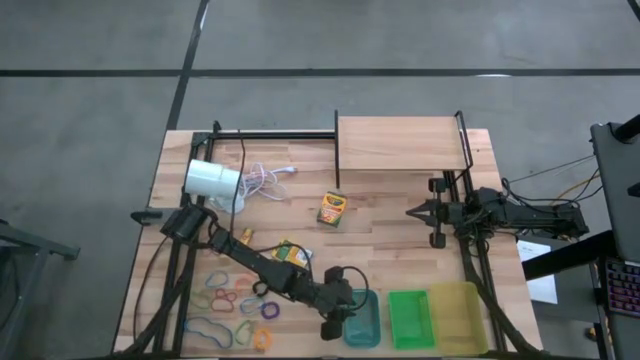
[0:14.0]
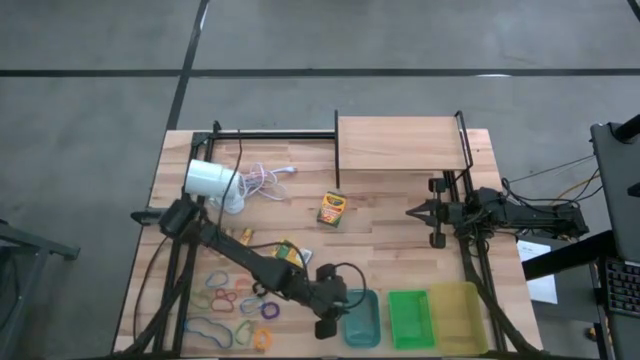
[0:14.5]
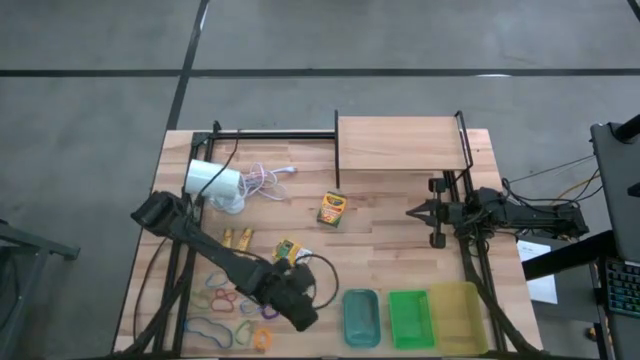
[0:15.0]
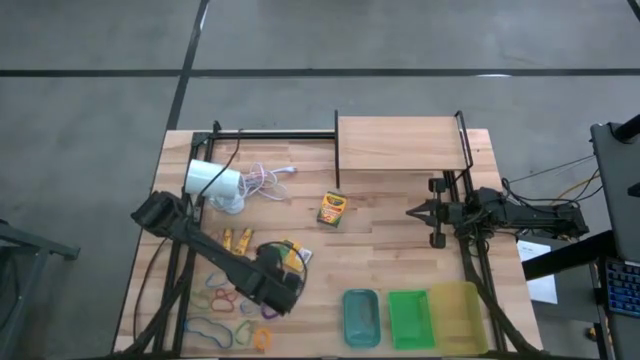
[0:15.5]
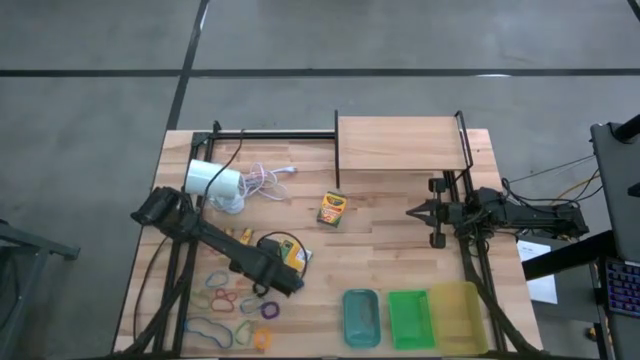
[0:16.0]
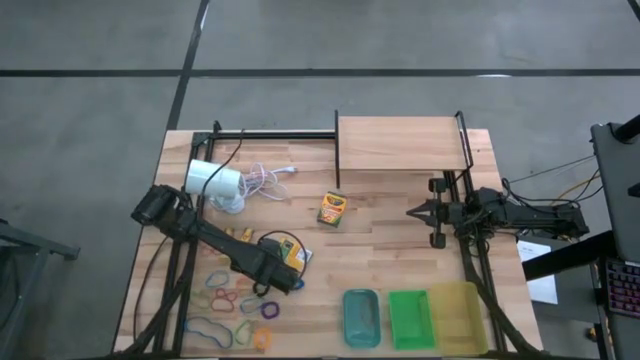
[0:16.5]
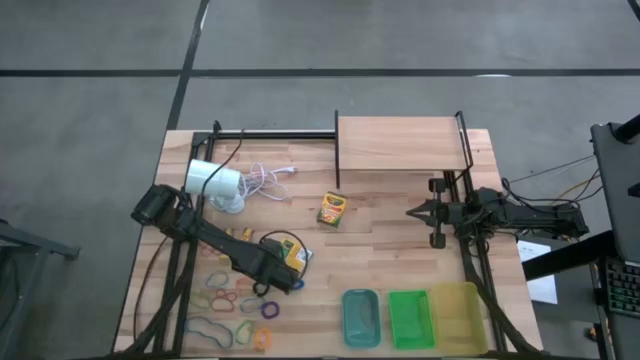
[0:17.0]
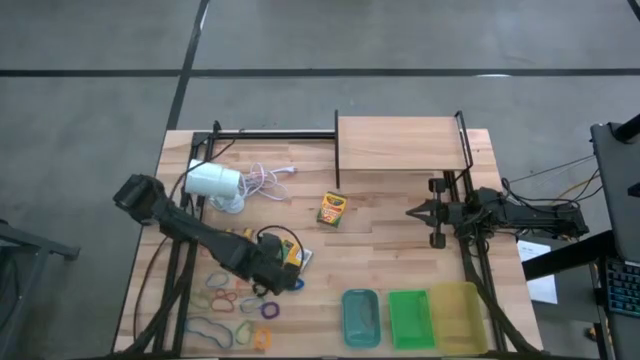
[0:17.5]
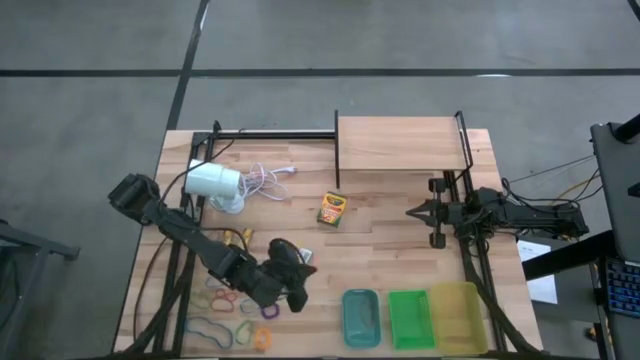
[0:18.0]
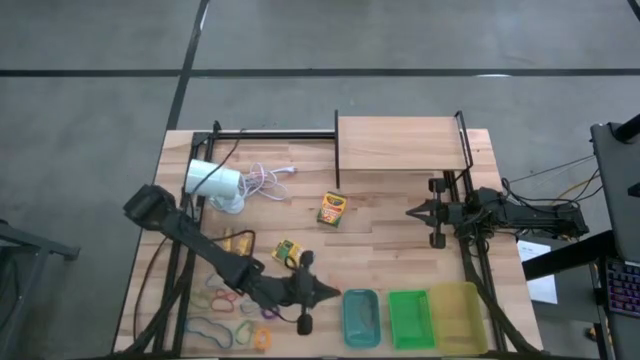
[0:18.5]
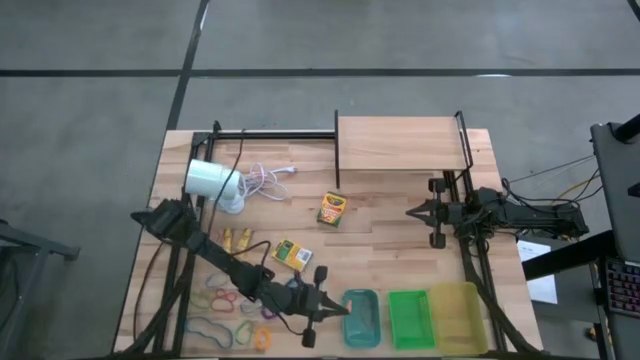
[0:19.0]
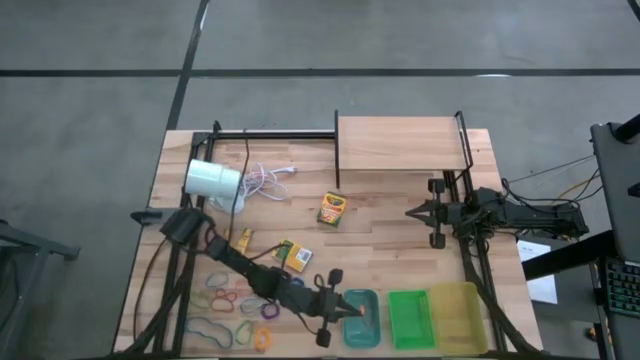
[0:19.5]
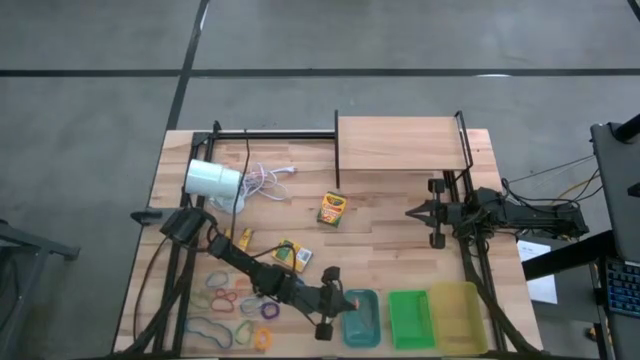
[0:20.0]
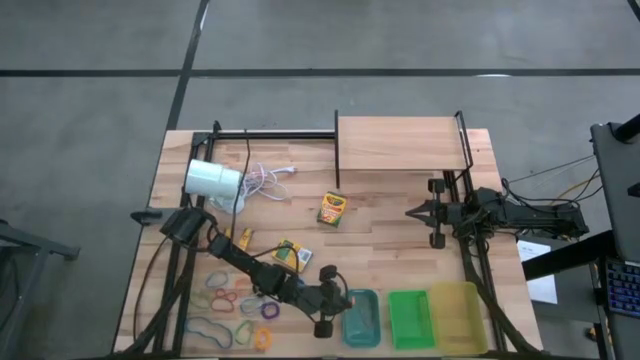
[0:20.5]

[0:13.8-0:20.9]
Task: Pick & Place Office Desk Supplies
Put the orange rubber band into the blue bin

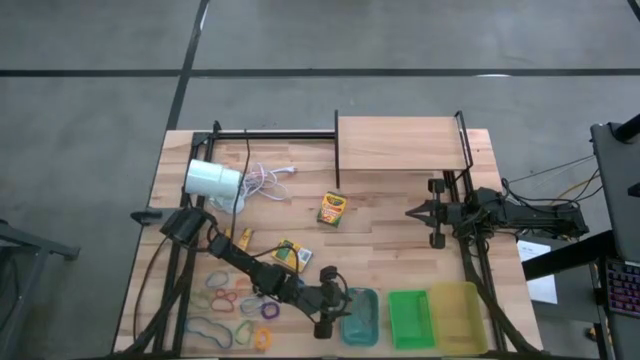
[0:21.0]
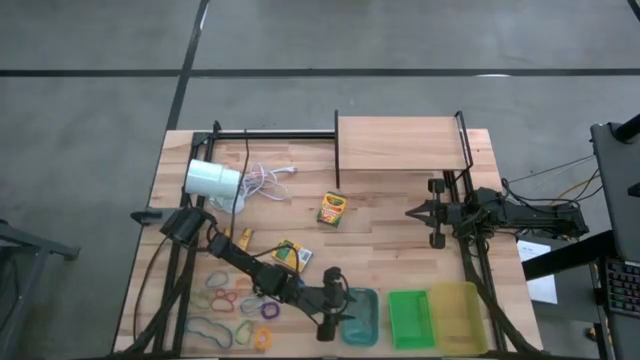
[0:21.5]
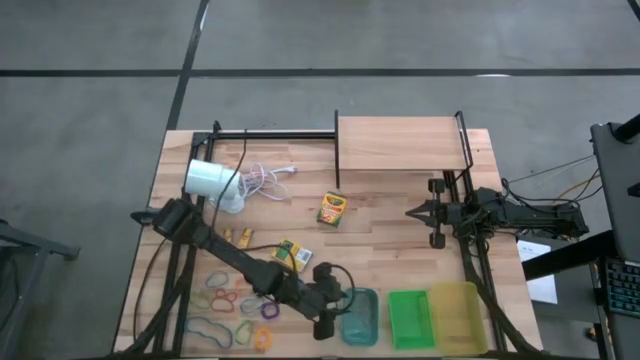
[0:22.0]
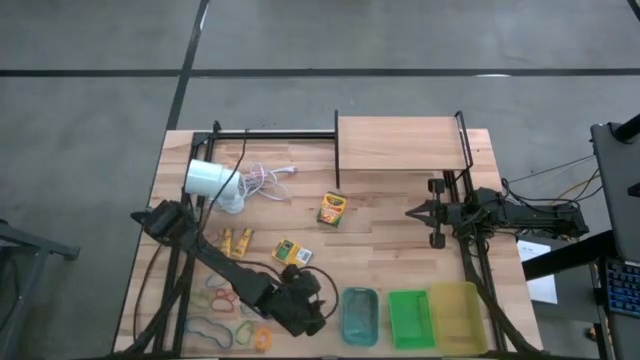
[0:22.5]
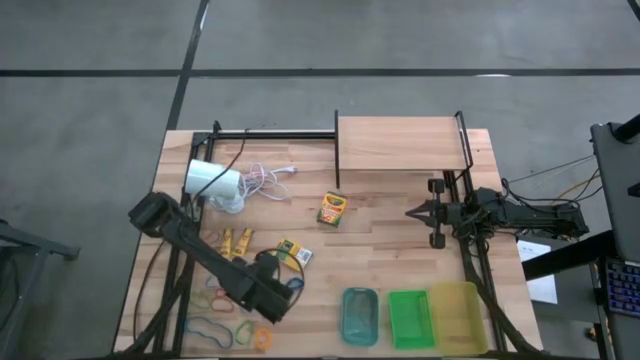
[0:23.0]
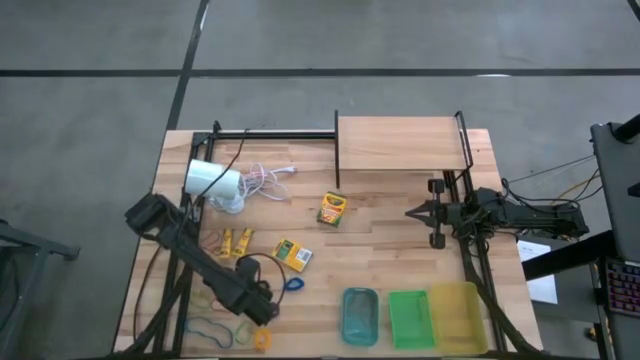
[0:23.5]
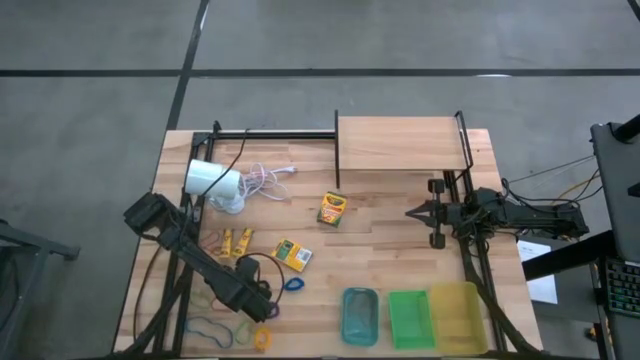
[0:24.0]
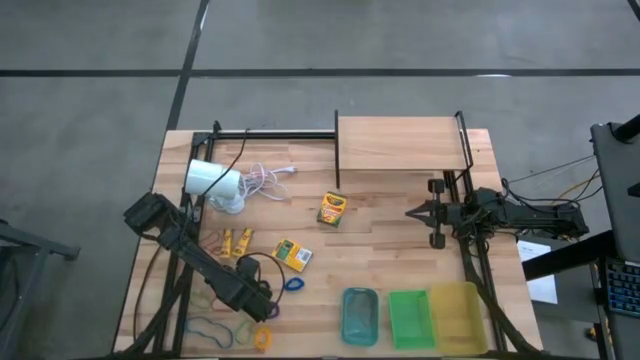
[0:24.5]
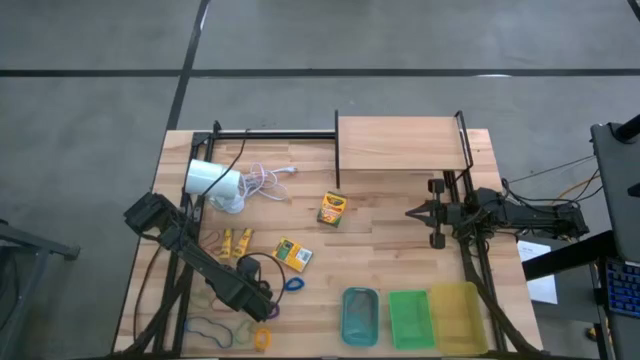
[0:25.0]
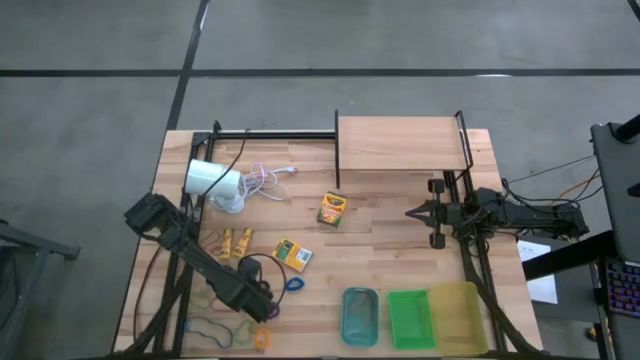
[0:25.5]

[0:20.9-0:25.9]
Put the orange rubber band into the blue bin

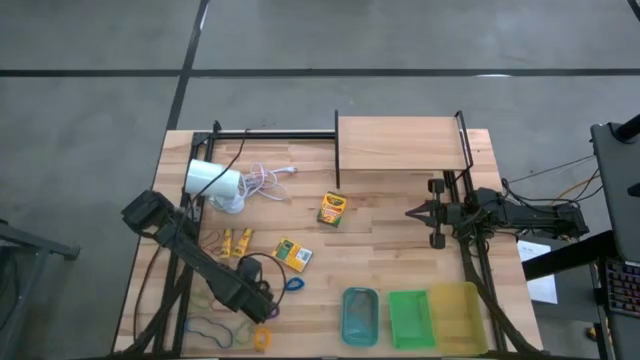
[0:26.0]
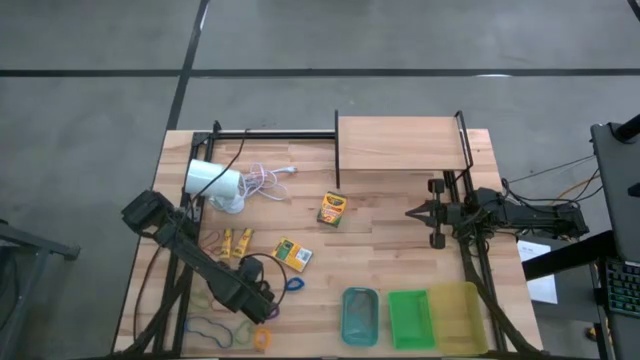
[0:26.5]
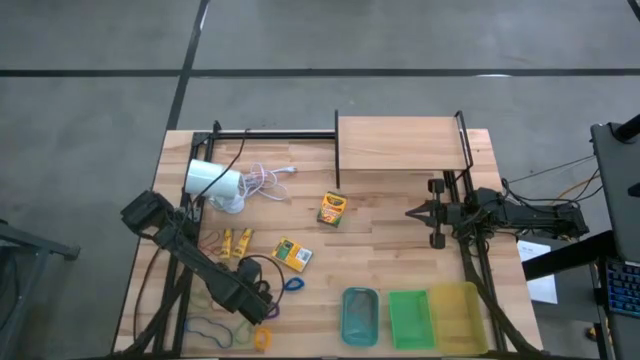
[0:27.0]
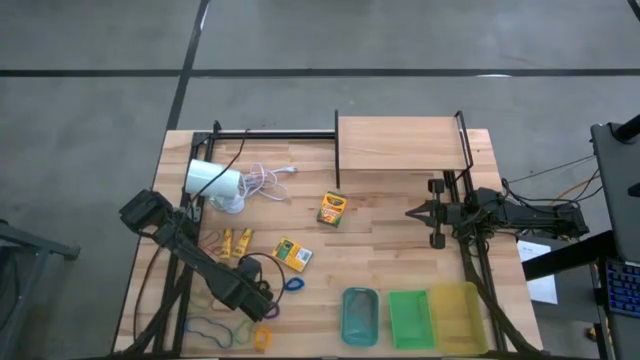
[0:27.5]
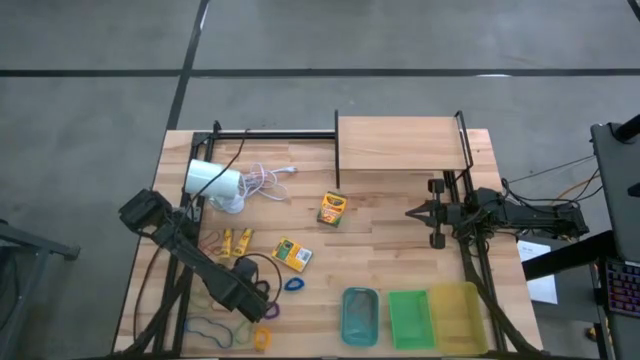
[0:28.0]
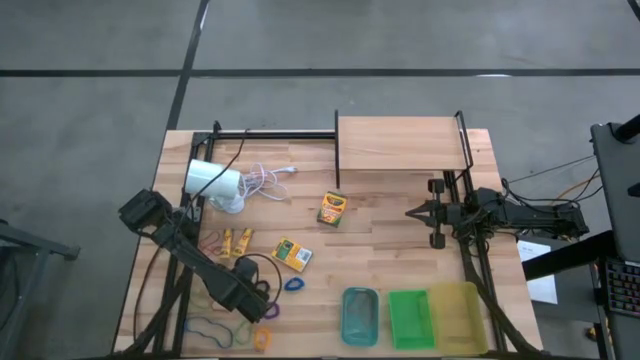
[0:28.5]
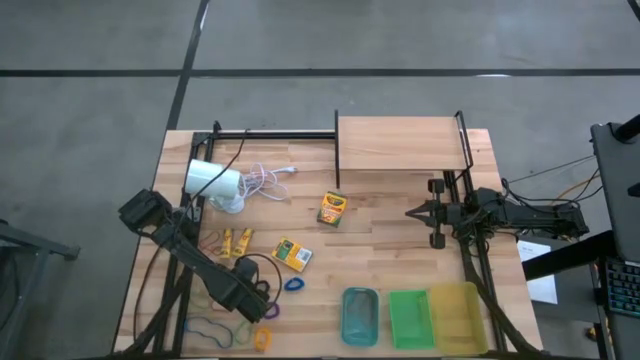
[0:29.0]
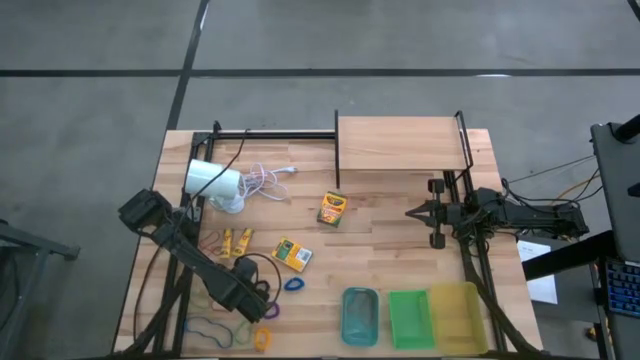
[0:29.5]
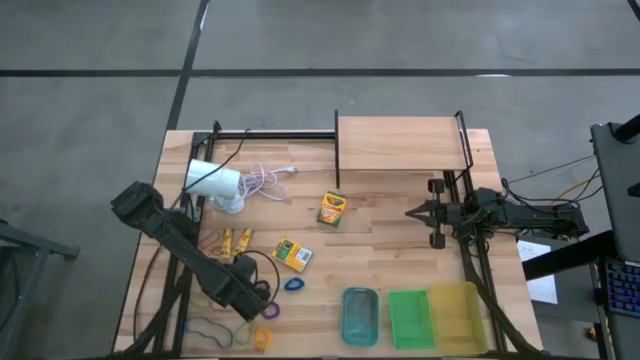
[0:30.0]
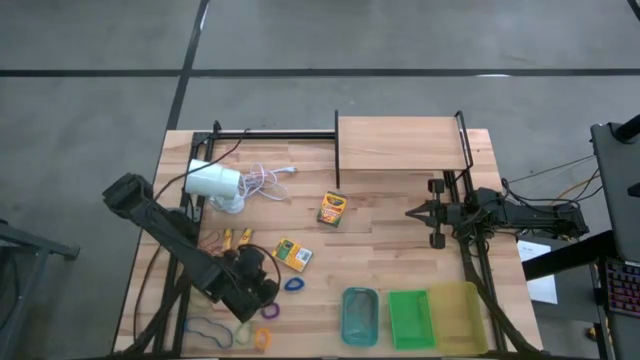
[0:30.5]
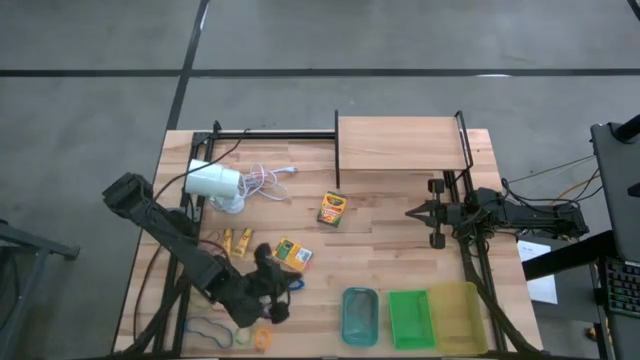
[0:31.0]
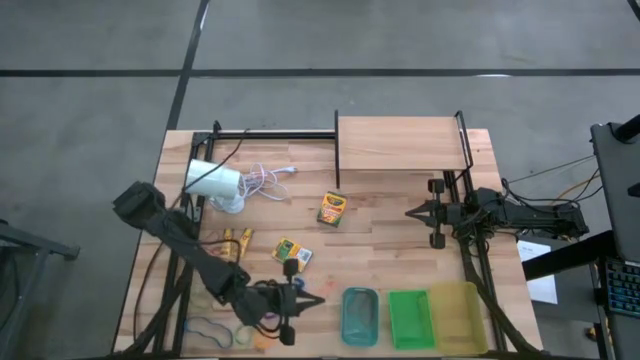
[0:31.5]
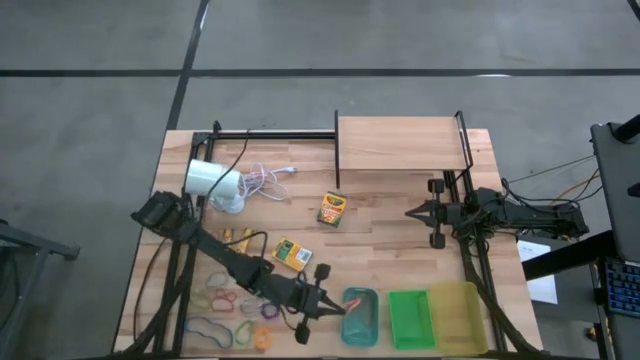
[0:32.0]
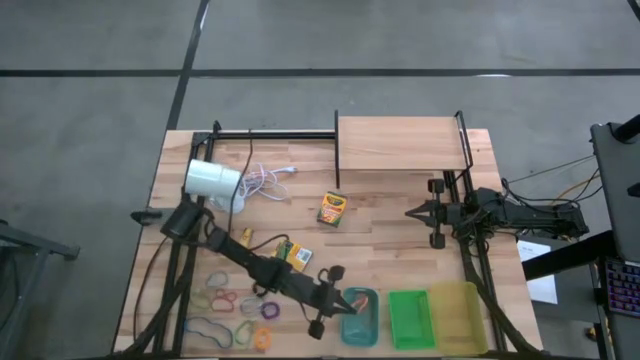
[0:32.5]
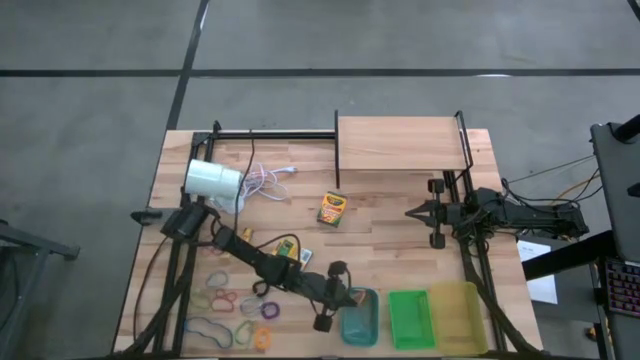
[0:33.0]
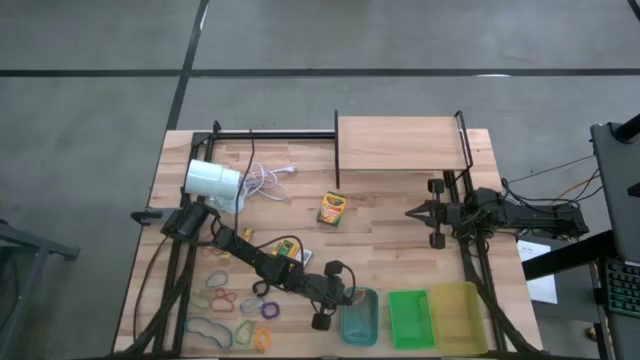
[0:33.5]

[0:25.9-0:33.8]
Put the orange rubber band into the blue bin

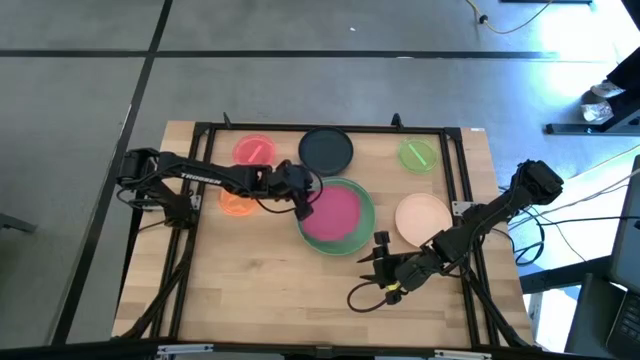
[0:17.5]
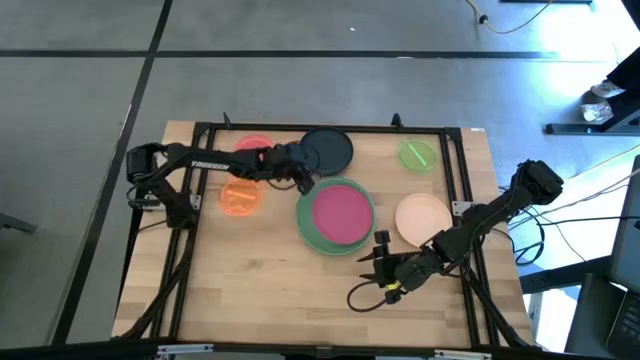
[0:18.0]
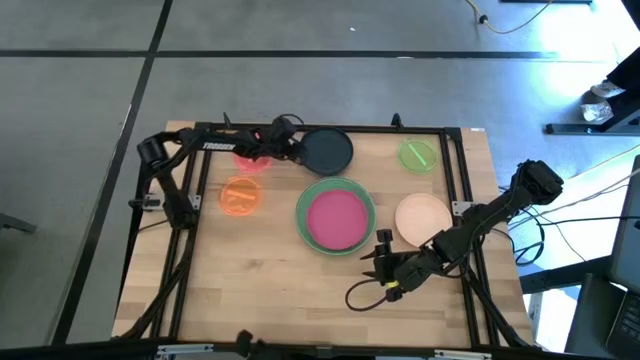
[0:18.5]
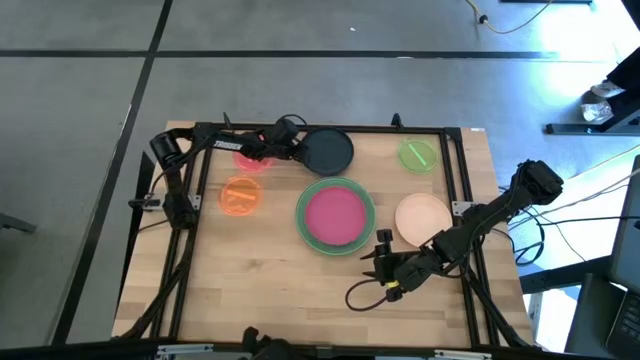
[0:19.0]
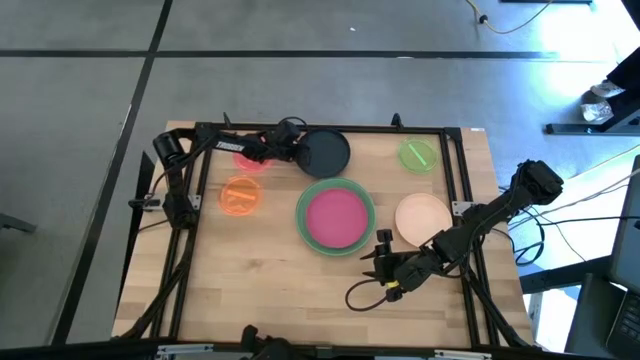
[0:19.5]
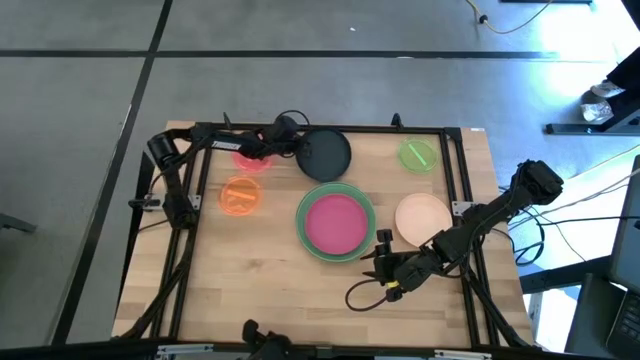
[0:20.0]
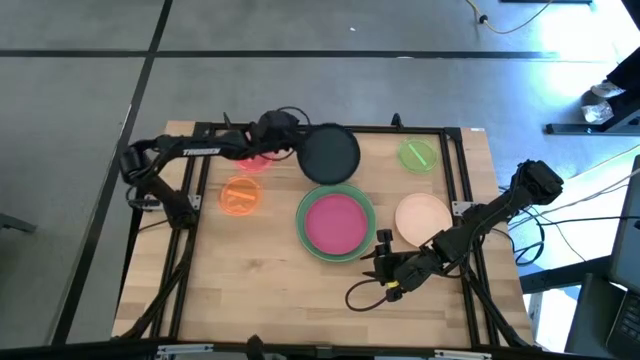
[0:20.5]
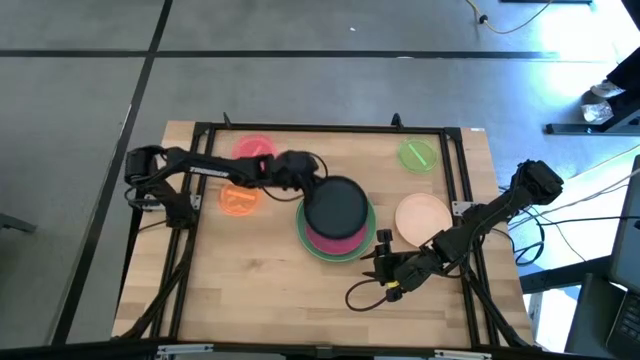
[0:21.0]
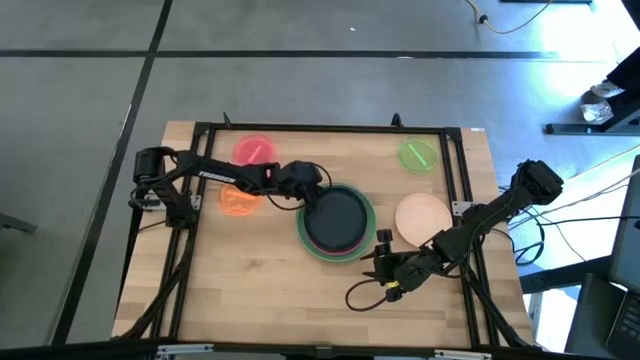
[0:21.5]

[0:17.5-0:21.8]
Task: Stack plastic plates
Stack the dark blue plate on top of the pink plate
